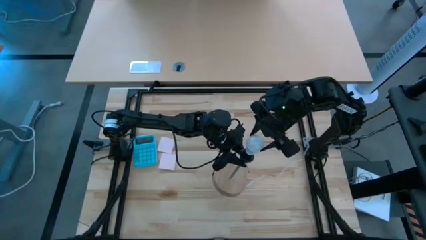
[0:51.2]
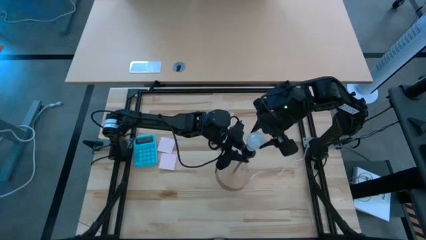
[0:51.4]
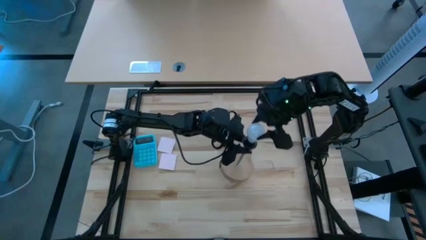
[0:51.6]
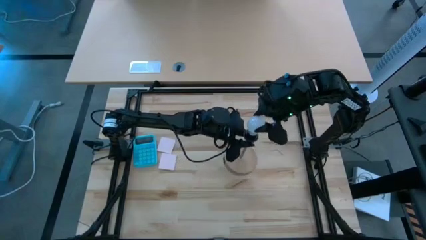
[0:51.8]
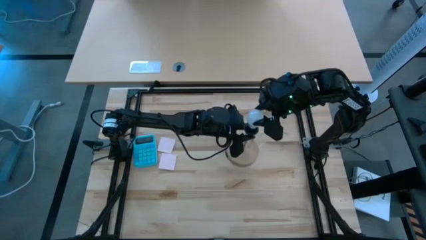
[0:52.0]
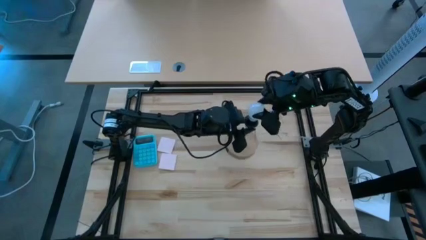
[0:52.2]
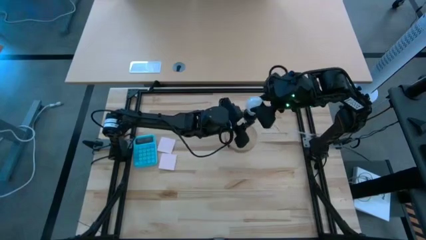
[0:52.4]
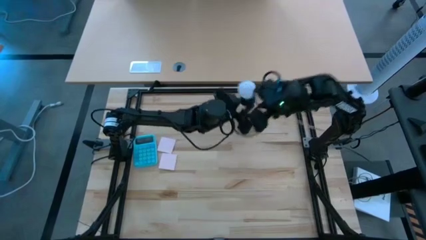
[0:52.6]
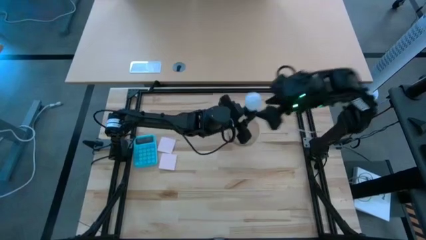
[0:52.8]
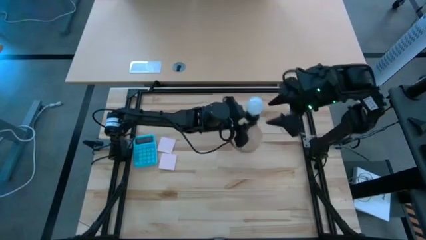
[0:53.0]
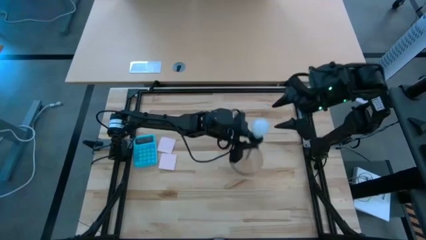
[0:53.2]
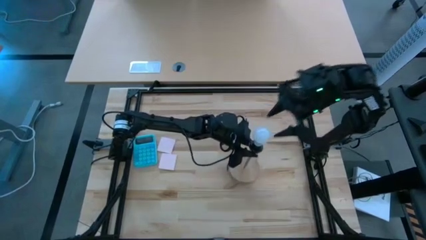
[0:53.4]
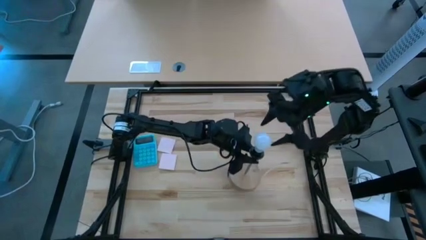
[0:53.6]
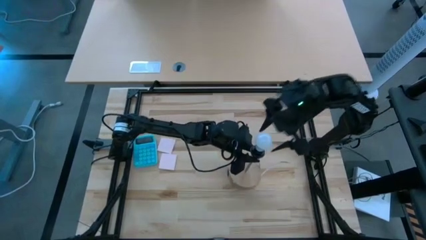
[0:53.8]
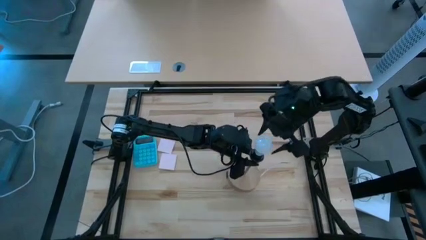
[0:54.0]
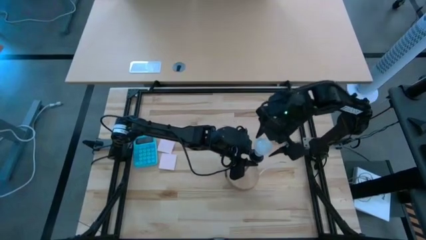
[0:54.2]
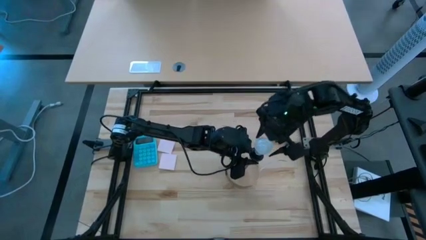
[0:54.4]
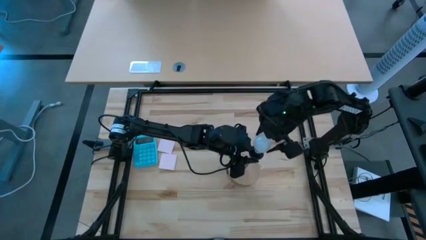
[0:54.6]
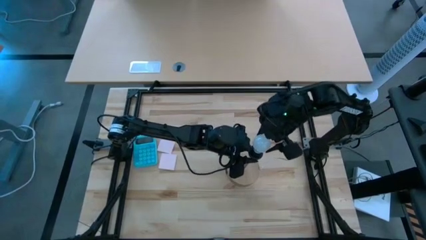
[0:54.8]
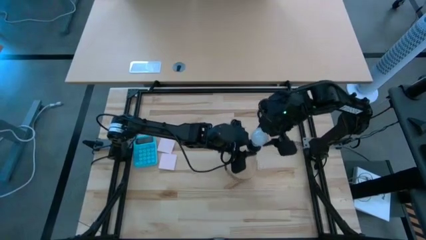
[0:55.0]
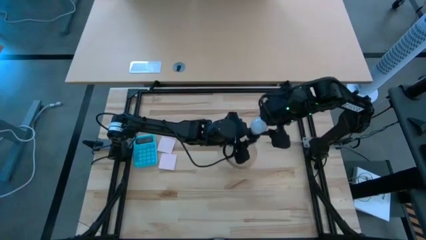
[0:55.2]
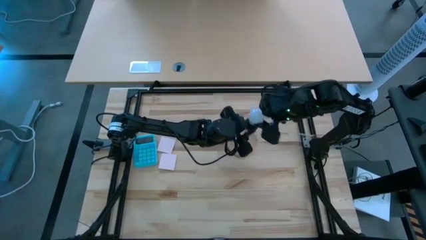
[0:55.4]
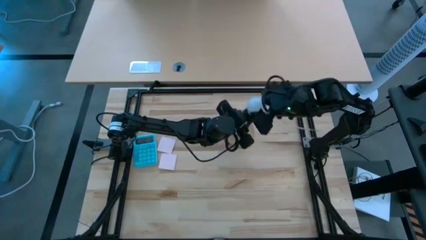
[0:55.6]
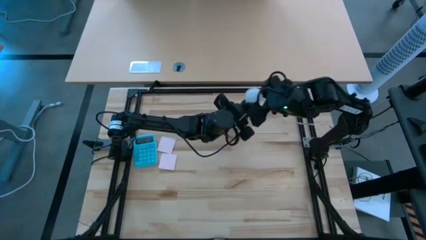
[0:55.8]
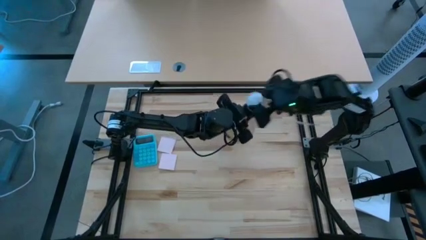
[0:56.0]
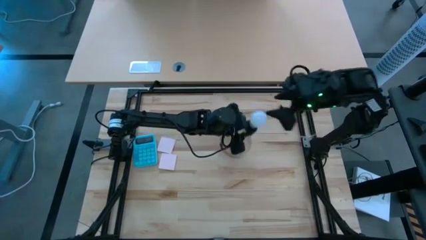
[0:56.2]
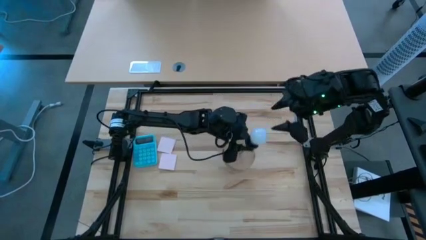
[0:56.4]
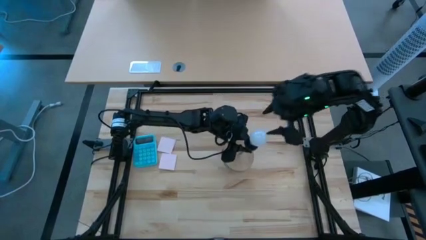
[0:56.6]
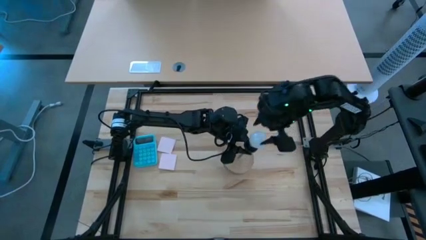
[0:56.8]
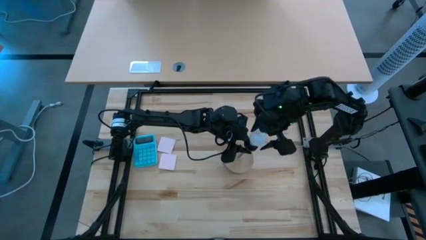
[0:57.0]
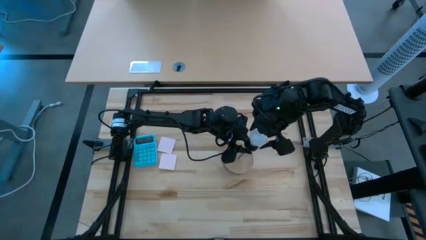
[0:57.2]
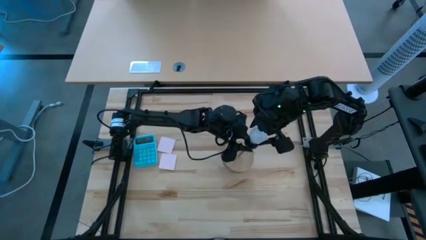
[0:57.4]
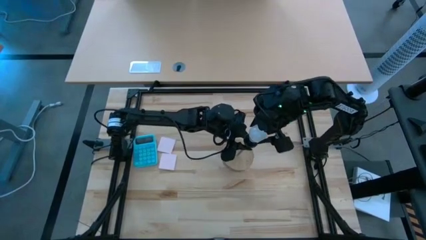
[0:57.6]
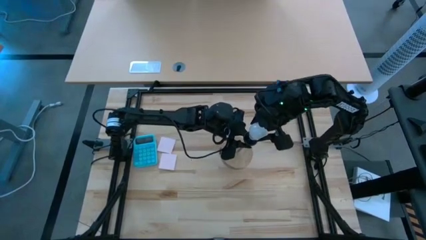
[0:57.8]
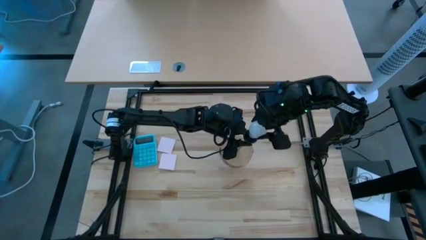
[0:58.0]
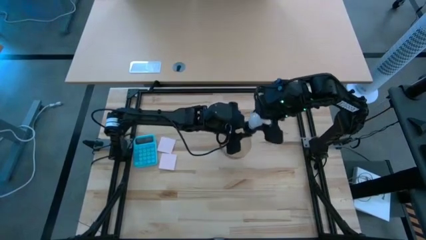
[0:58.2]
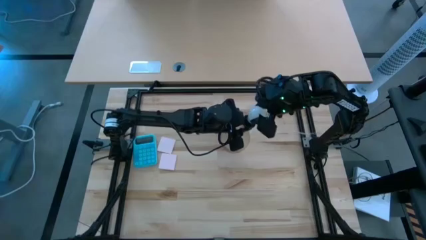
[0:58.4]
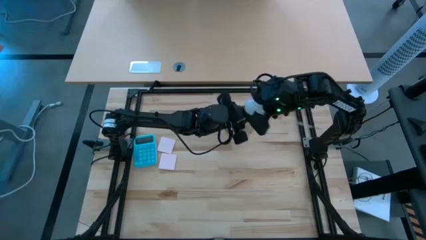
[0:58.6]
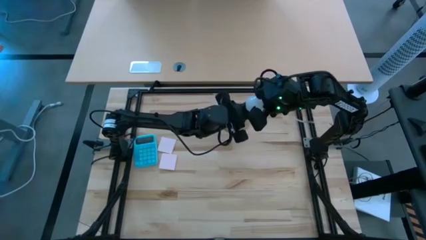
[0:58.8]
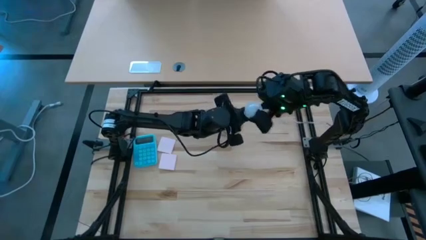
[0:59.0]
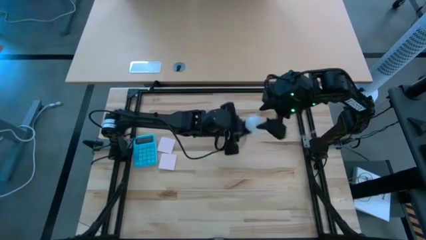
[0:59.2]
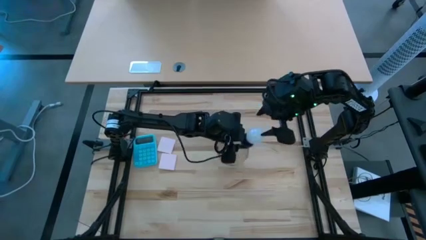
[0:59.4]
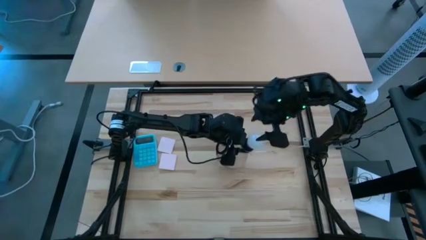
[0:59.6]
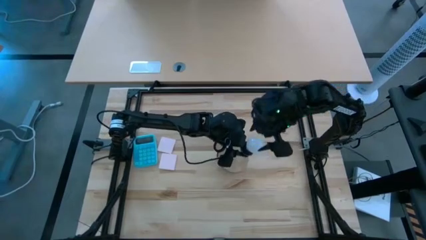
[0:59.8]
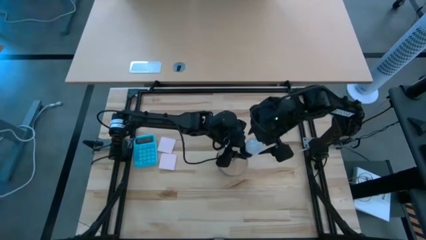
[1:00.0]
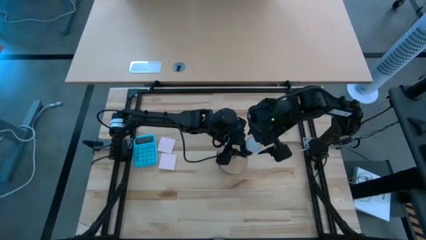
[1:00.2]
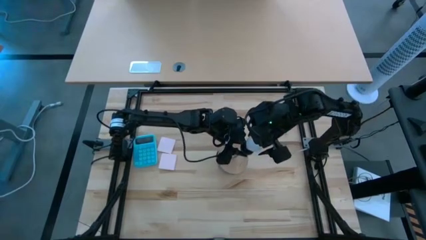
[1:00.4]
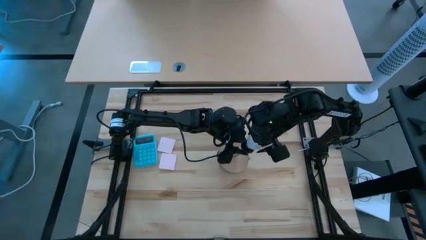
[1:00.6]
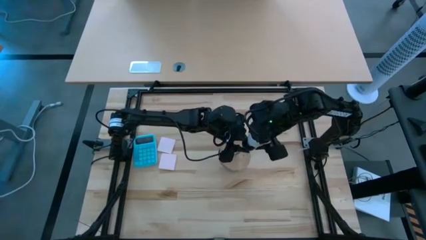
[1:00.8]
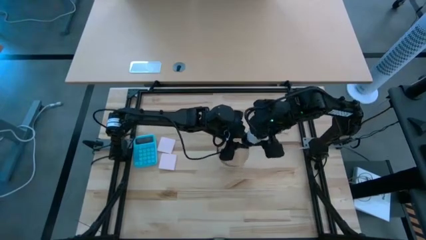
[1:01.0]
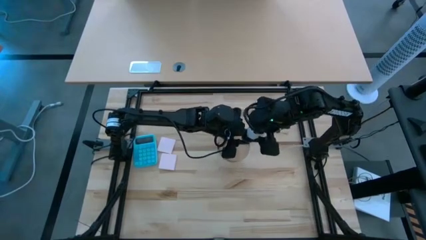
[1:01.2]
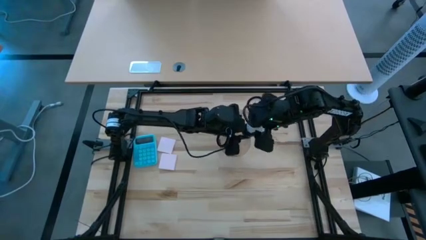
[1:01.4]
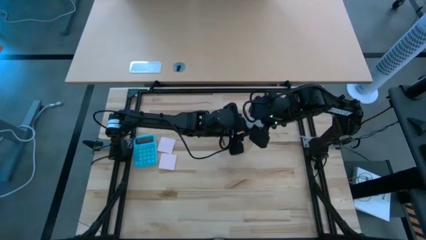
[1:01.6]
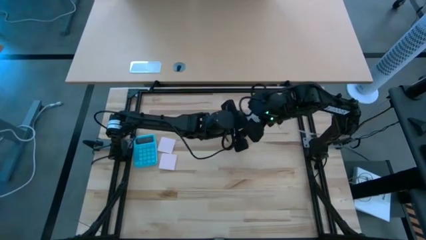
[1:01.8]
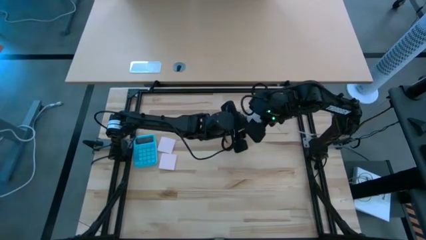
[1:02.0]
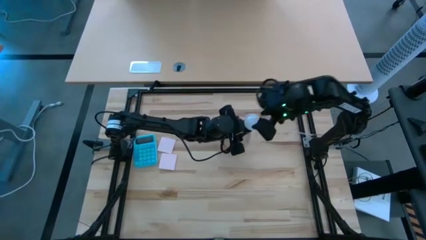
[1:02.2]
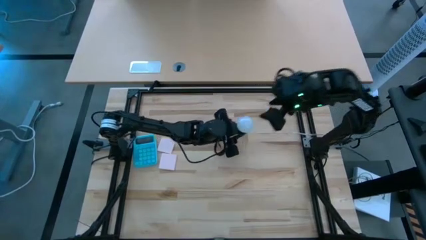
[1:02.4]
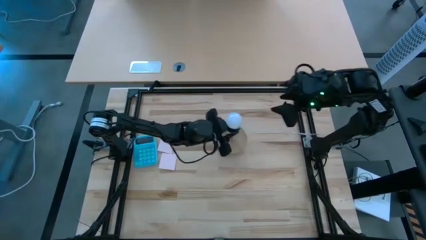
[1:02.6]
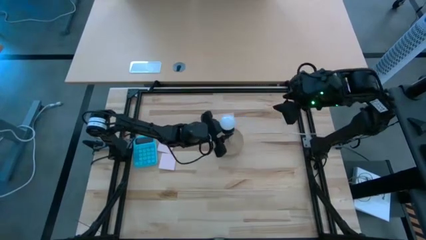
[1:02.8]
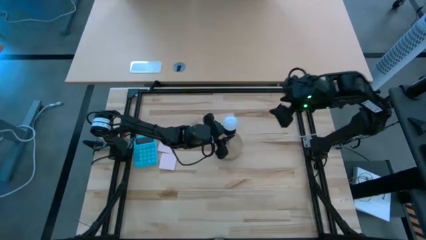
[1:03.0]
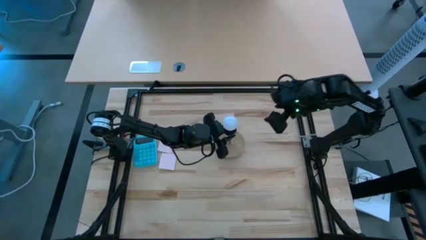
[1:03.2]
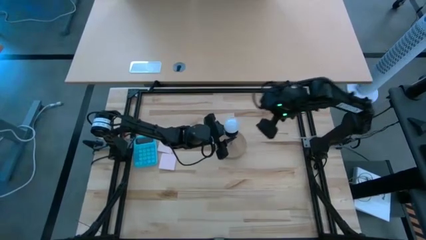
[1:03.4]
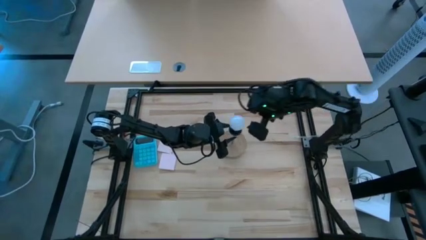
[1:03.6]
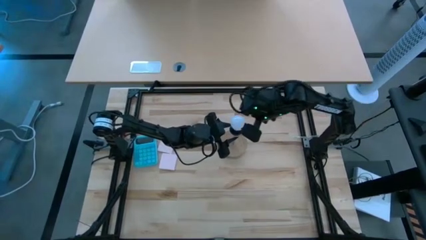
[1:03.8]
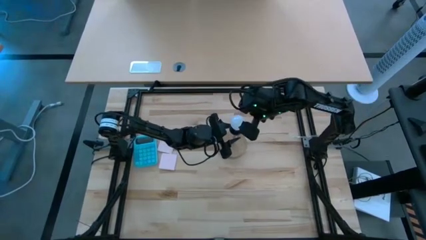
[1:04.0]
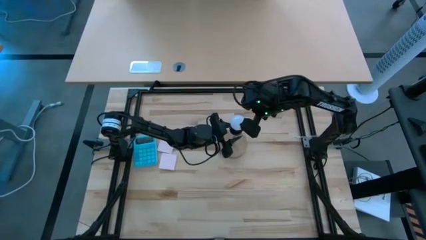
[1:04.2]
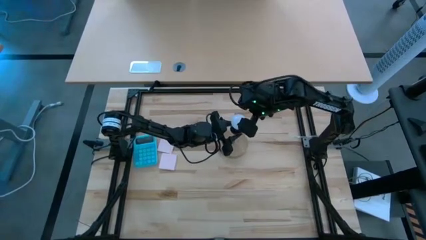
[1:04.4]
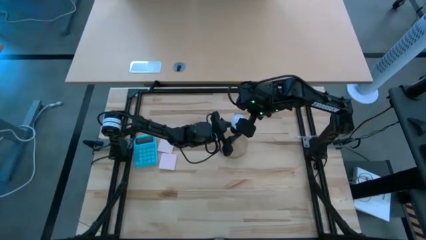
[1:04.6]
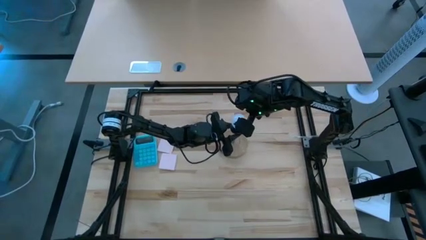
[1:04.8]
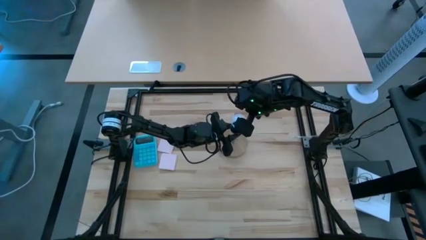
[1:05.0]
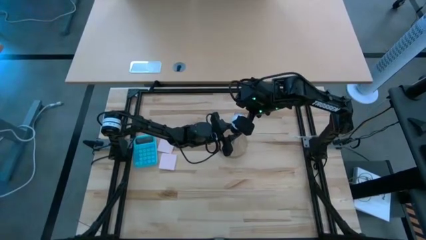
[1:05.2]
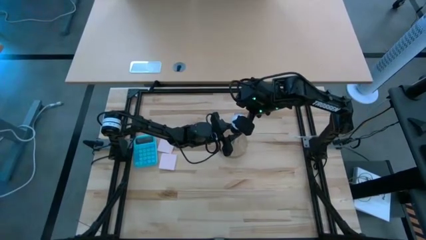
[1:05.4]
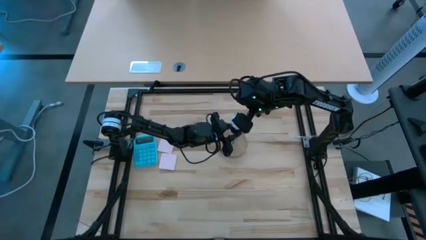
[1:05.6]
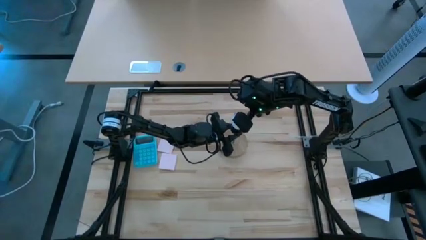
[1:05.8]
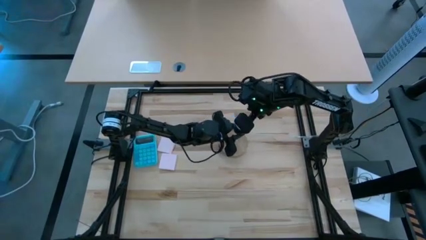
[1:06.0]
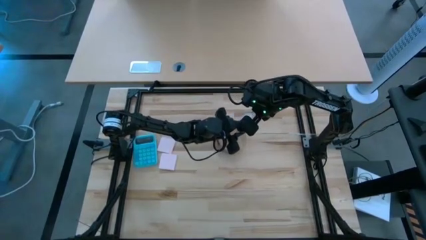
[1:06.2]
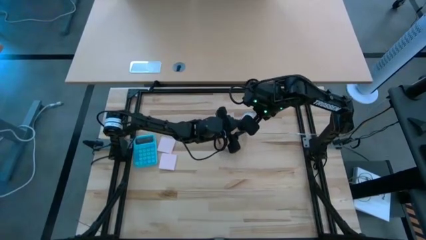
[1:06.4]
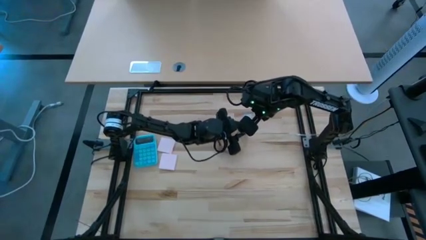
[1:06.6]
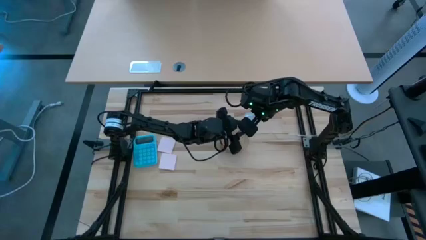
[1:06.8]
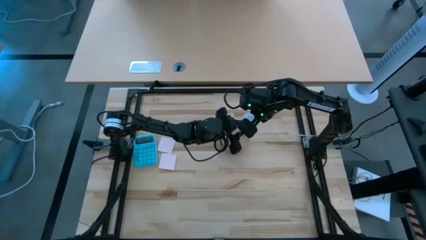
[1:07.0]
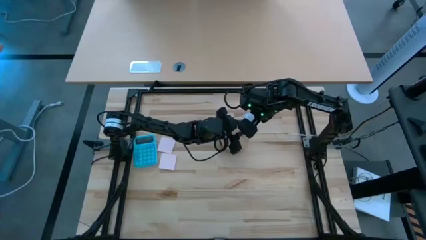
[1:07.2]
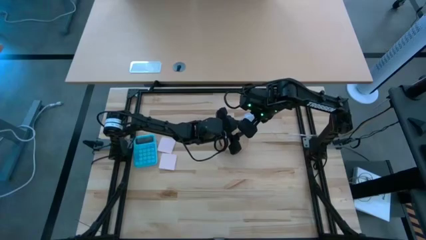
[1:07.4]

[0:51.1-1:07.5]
Task: Screw lightbulb
Insert the lightbulb into the lamp
